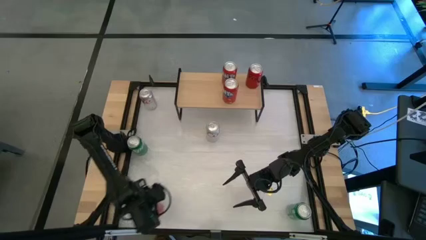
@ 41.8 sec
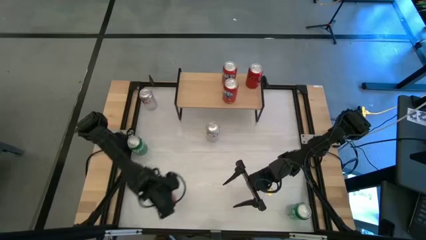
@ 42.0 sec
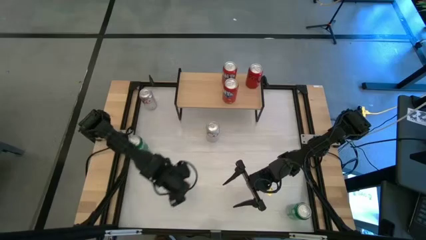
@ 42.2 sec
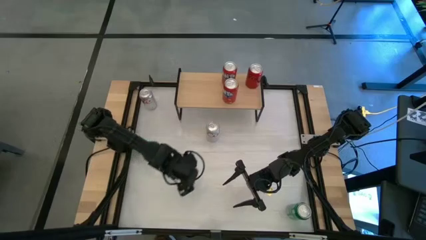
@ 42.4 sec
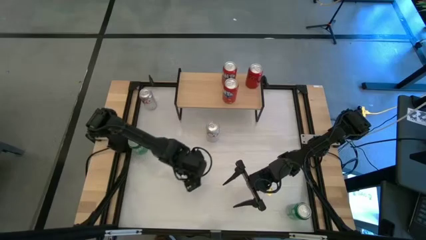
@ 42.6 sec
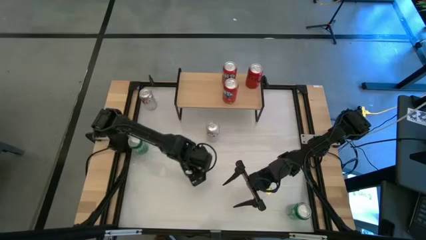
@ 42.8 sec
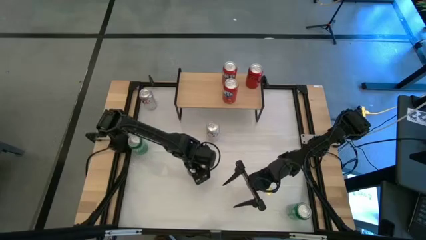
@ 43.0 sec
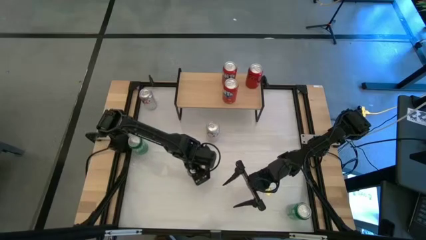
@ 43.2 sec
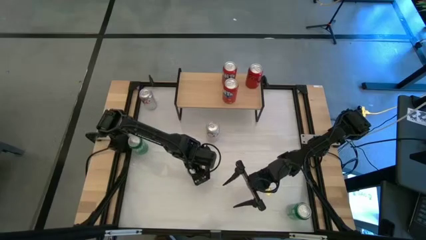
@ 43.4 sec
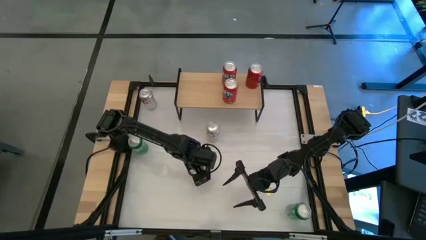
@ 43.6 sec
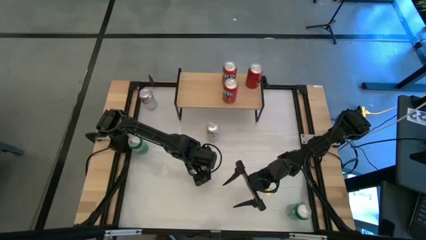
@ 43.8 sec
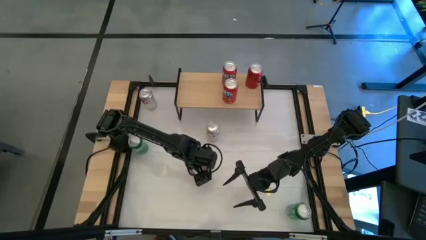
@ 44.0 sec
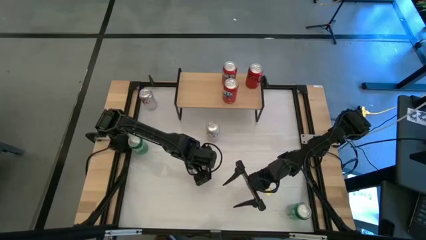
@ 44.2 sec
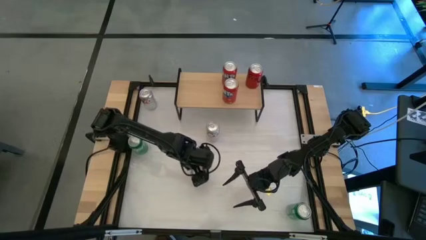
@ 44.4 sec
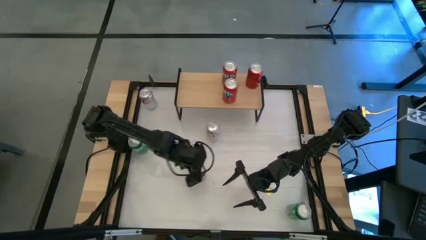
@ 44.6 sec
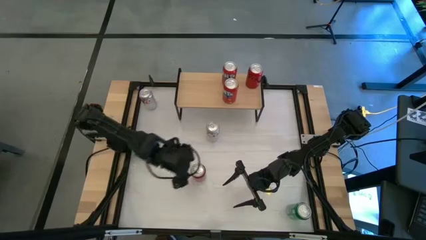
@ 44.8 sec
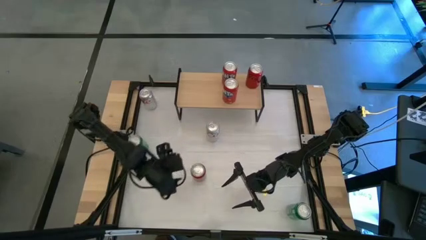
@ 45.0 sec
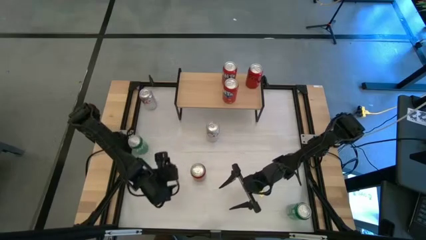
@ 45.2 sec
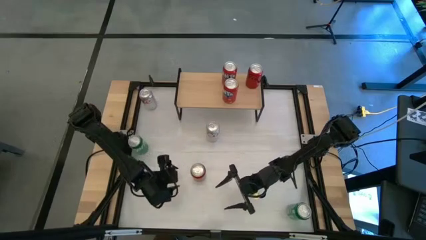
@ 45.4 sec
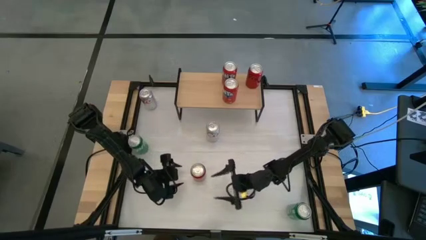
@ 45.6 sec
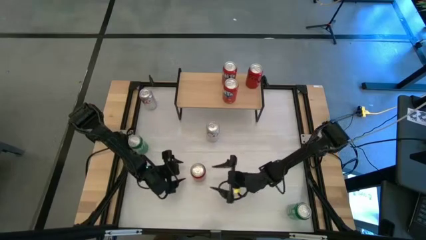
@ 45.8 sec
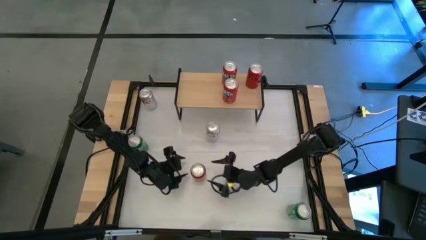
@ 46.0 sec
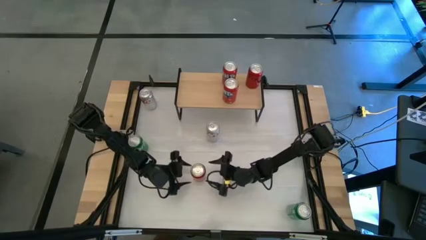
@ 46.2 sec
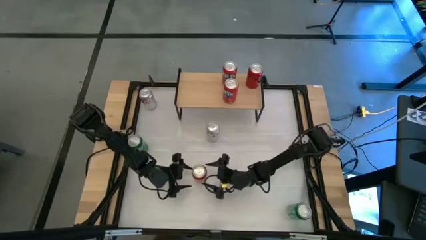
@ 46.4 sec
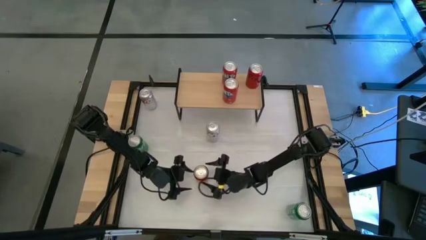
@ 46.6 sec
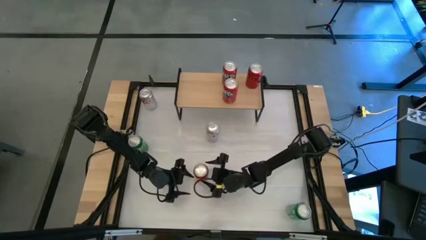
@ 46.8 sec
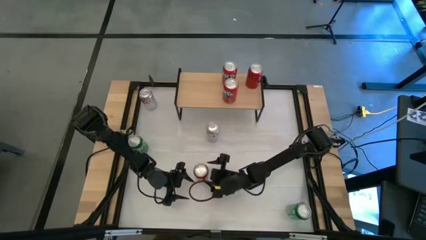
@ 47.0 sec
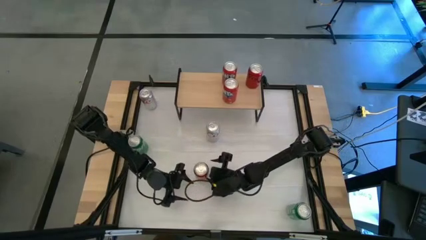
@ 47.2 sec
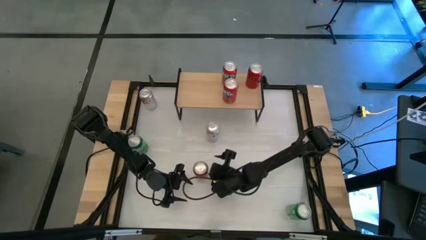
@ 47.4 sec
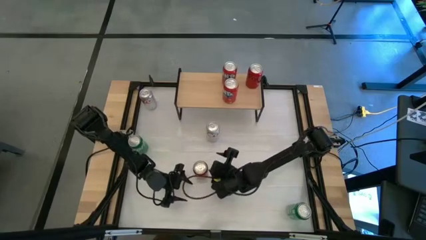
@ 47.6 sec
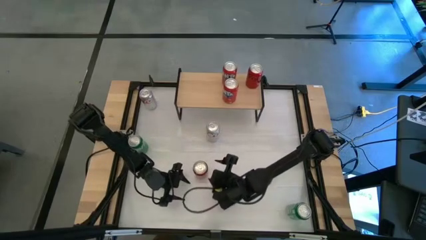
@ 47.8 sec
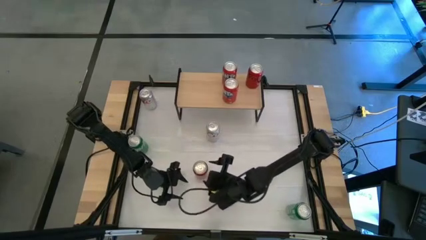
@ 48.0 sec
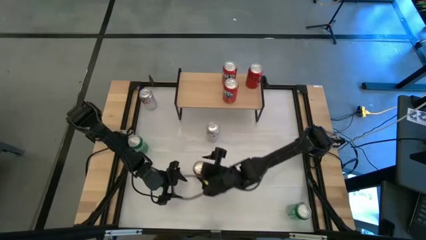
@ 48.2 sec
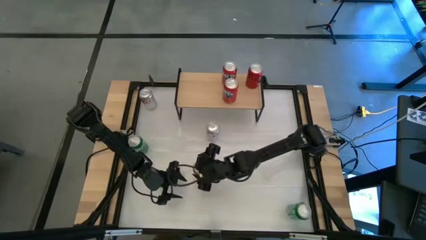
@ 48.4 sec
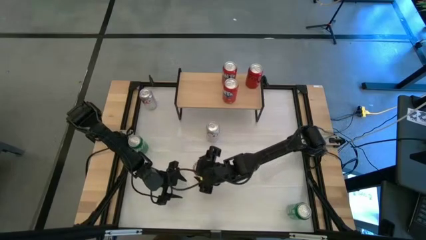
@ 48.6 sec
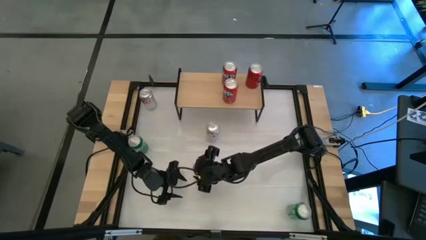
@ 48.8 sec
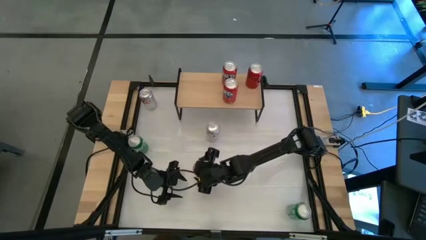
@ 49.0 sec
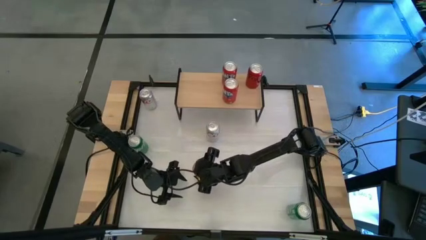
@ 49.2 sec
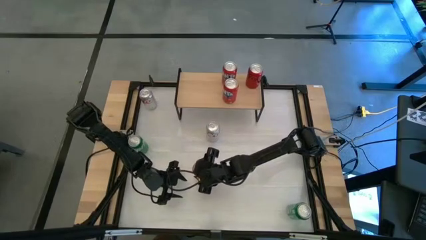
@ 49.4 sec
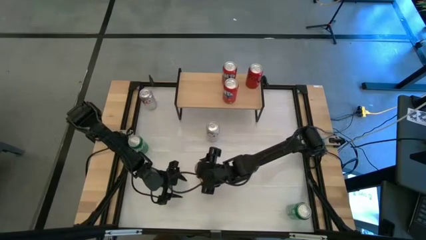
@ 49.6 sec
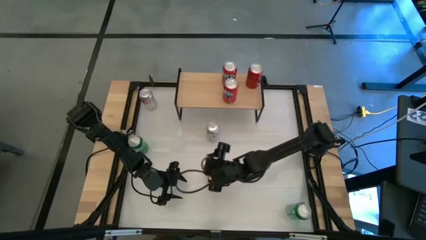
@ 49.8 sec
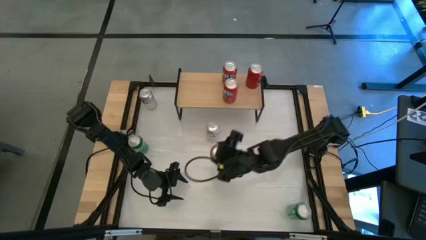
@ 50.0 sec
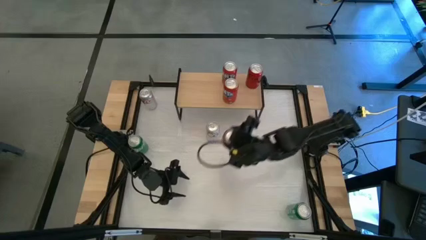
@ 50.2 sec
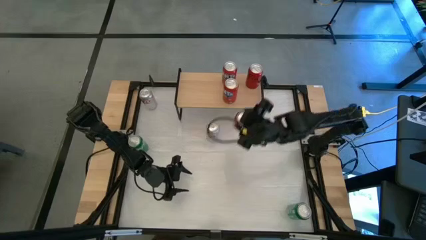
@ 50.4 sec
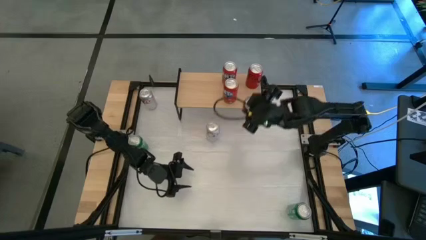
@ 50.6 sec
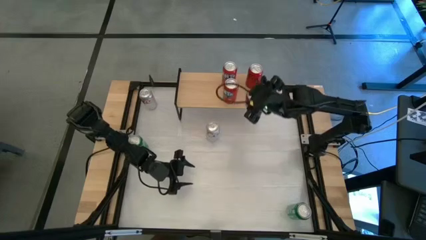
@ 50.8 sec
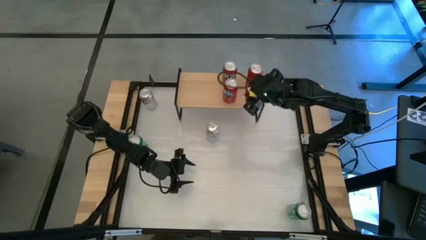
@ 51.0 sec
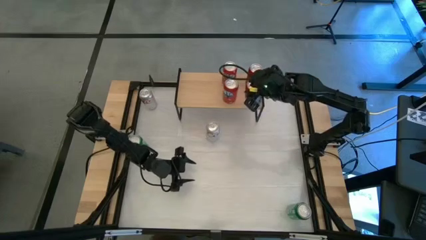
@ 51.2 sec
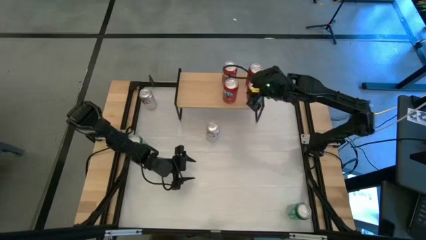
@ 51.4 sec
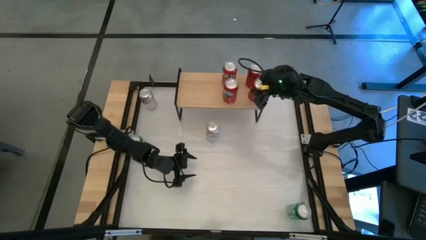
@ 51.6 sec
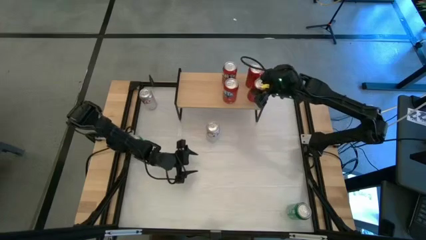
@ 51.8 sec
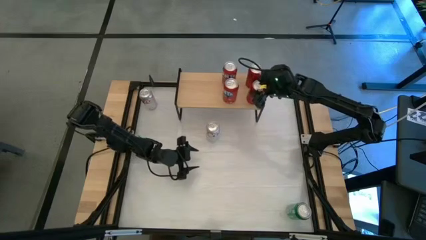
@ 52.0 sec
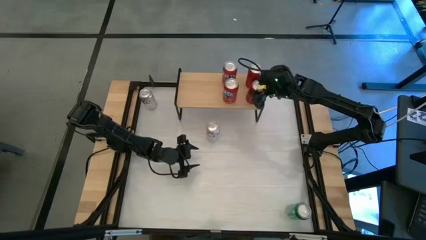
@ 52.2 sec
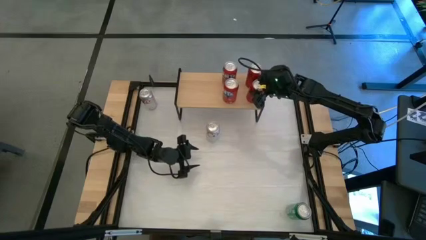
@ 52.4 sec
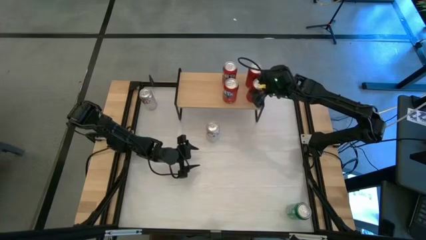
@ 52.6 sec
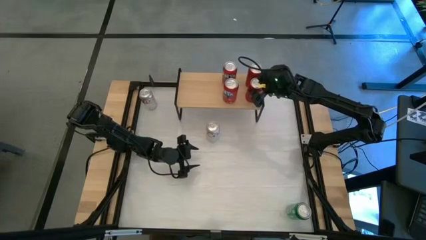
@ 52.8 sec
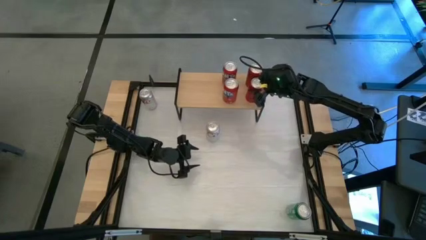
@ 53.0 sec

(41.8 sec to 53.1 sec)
Task: Place canned beverage on shelf
Put the red soda can on the shelf and align with the other red soda can
